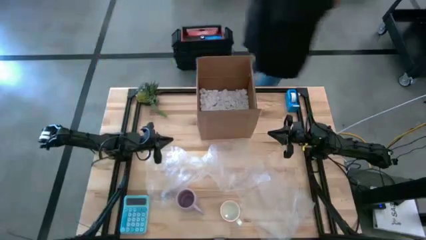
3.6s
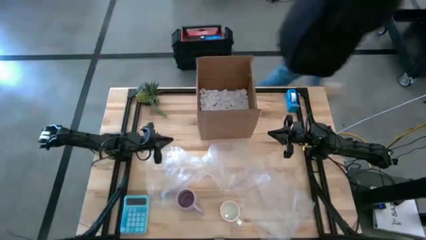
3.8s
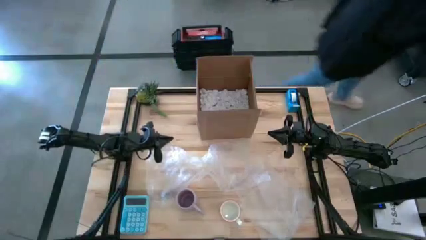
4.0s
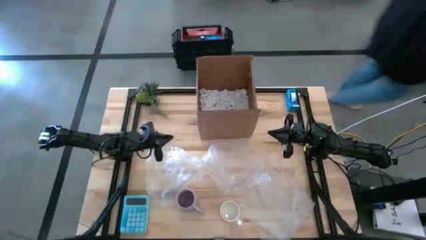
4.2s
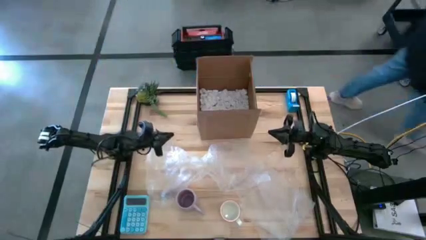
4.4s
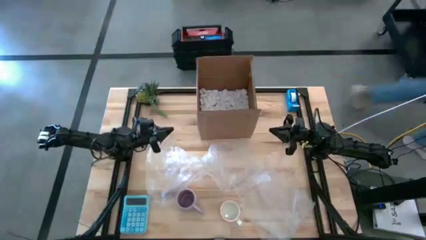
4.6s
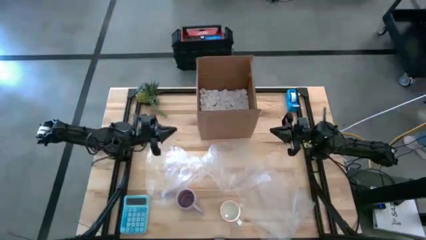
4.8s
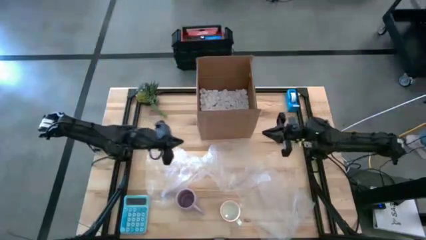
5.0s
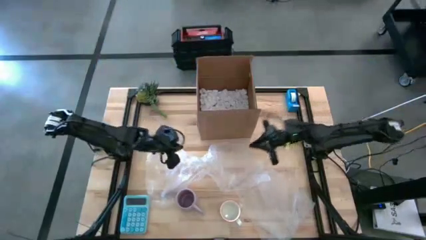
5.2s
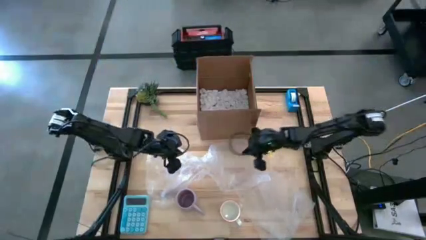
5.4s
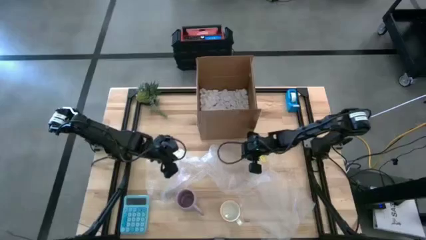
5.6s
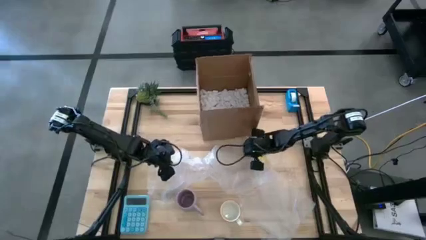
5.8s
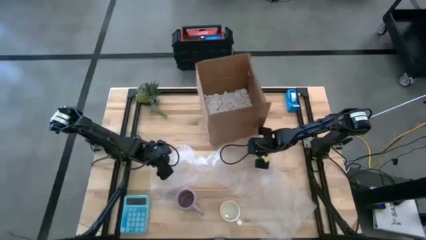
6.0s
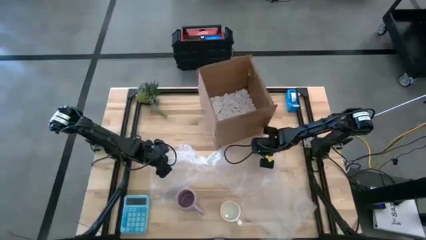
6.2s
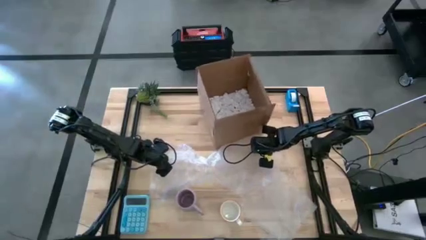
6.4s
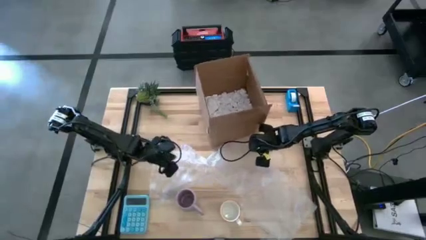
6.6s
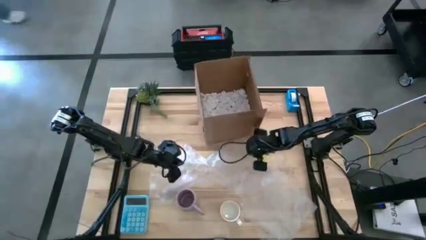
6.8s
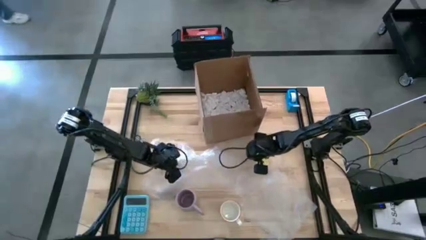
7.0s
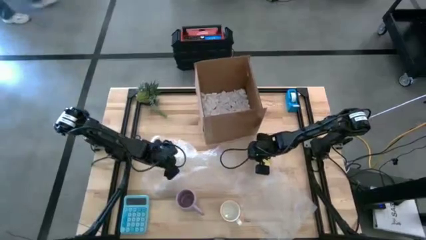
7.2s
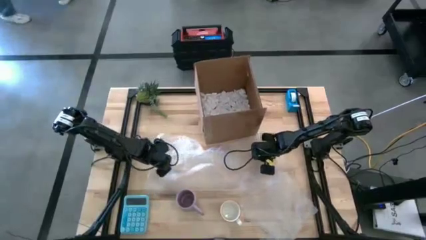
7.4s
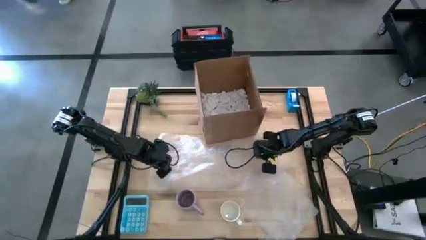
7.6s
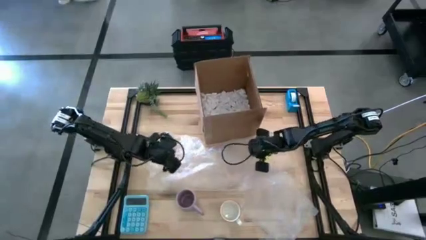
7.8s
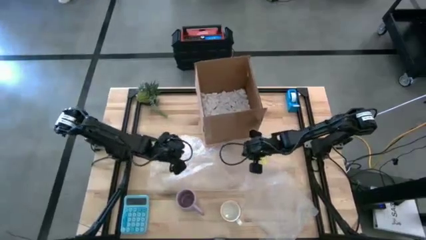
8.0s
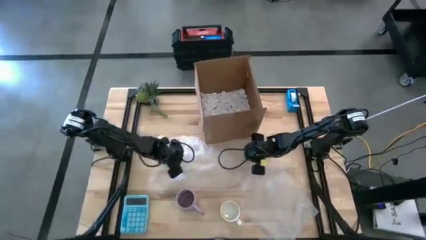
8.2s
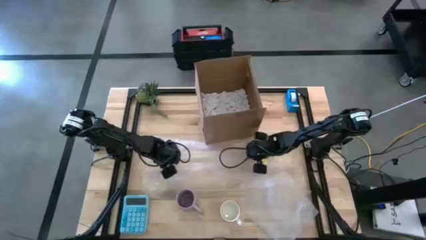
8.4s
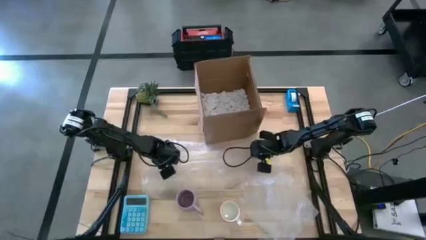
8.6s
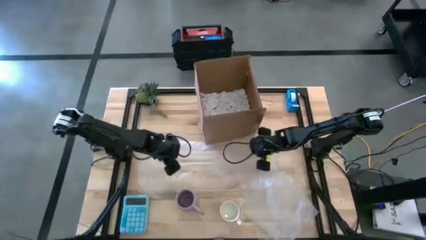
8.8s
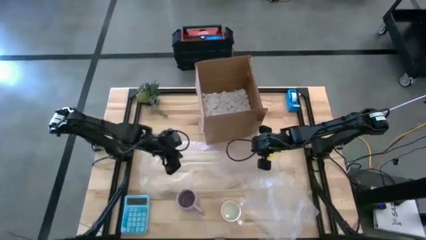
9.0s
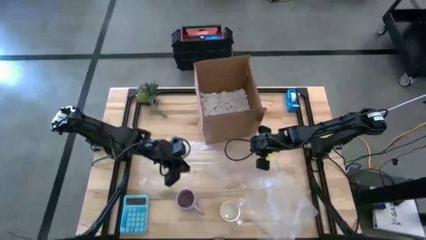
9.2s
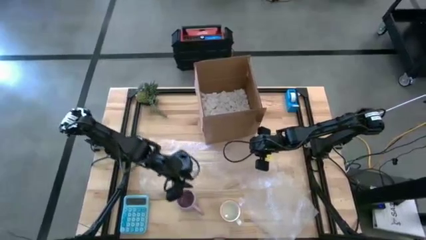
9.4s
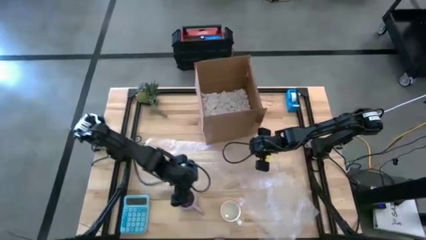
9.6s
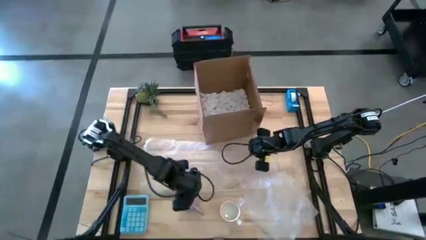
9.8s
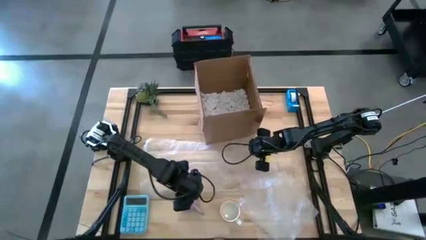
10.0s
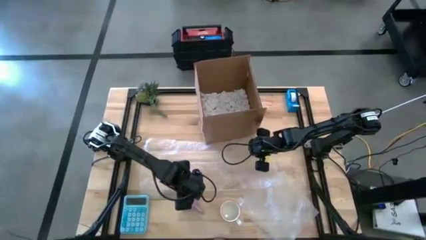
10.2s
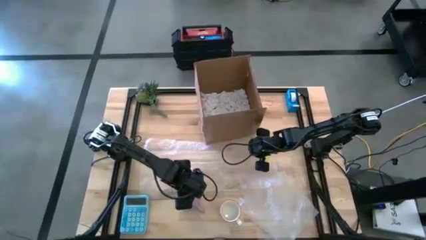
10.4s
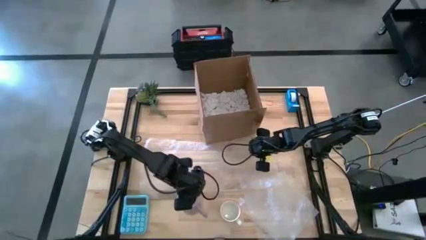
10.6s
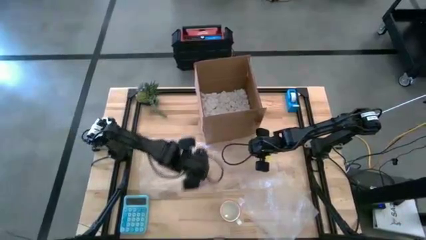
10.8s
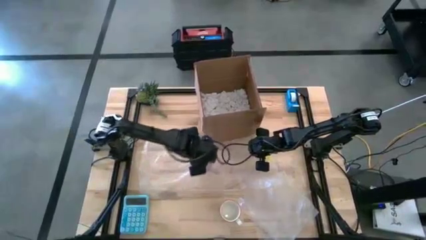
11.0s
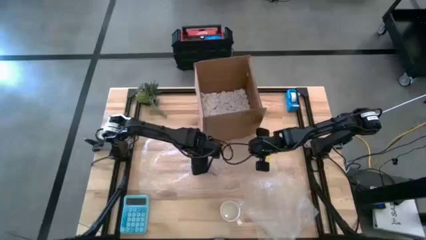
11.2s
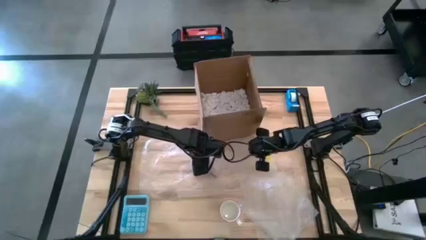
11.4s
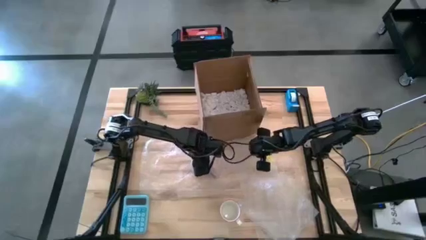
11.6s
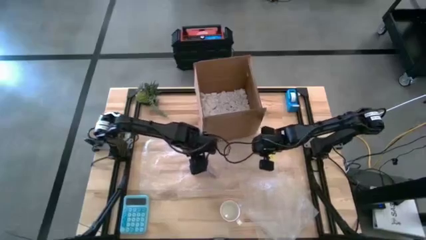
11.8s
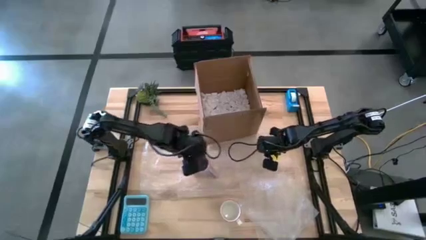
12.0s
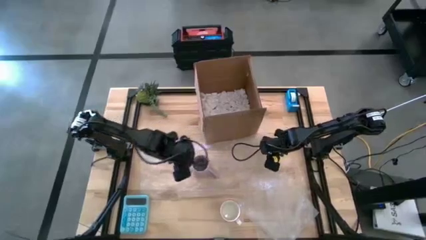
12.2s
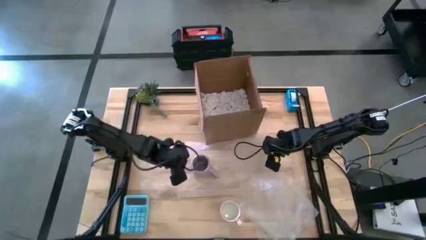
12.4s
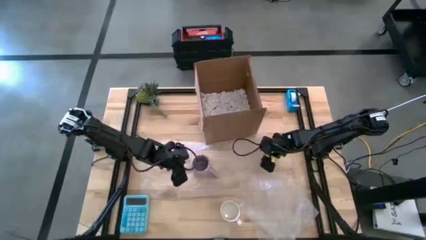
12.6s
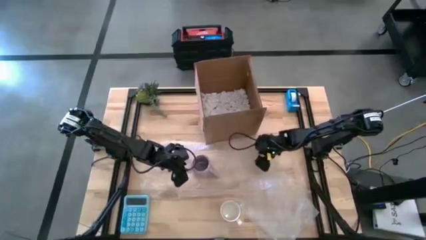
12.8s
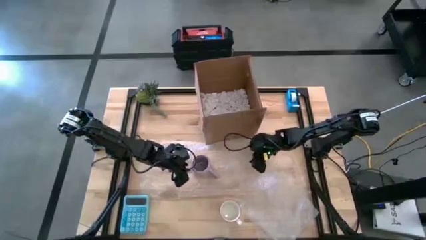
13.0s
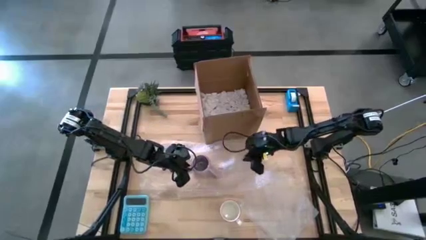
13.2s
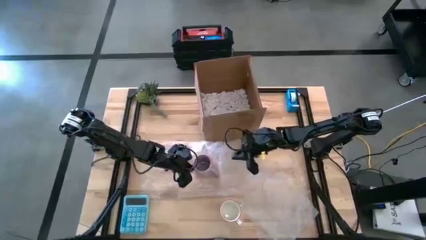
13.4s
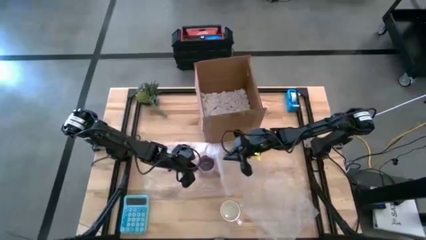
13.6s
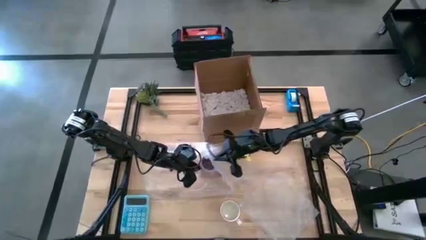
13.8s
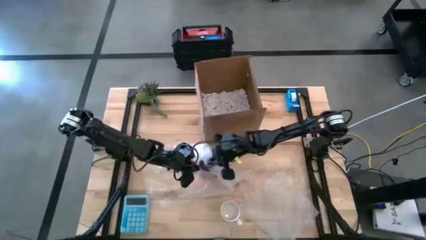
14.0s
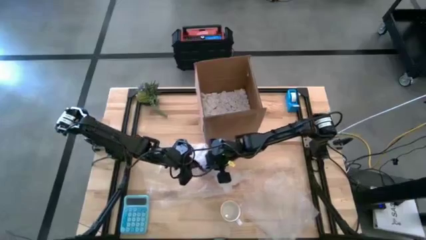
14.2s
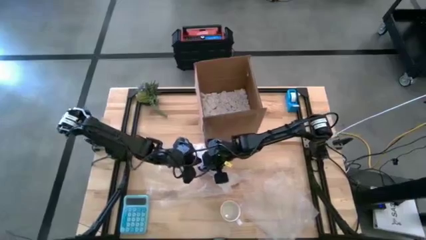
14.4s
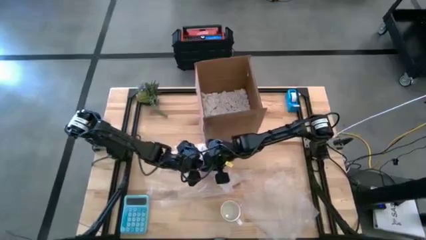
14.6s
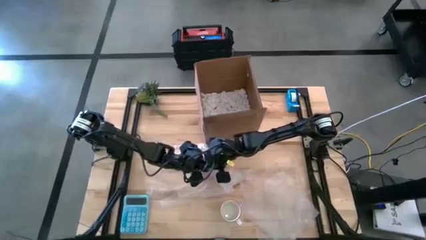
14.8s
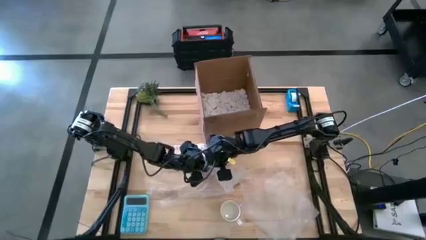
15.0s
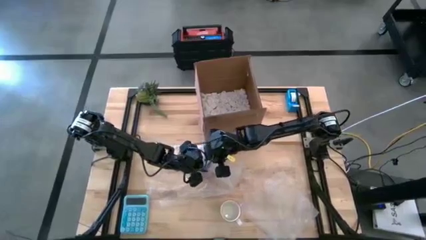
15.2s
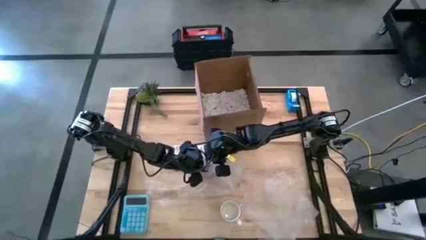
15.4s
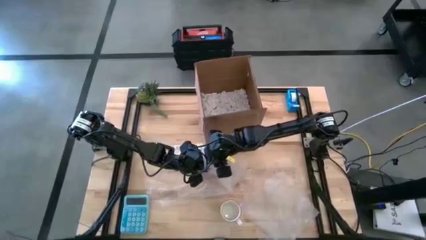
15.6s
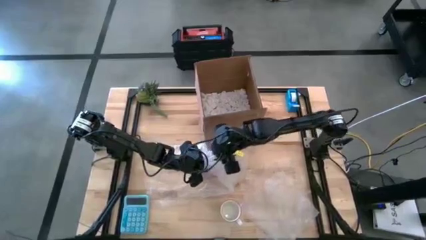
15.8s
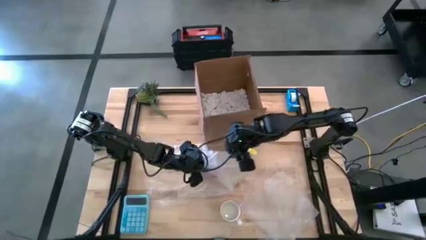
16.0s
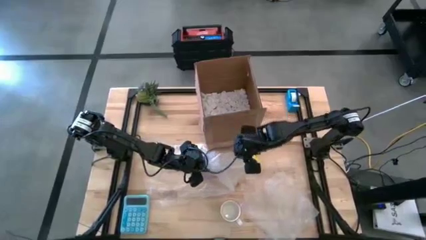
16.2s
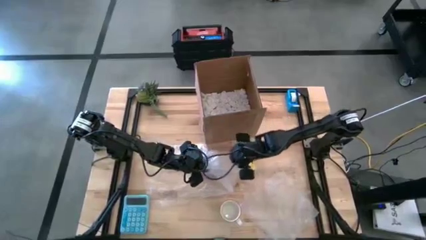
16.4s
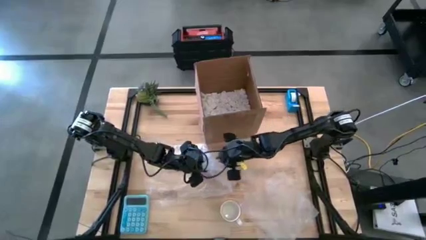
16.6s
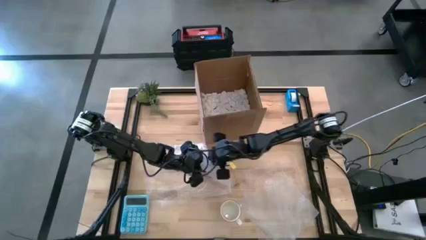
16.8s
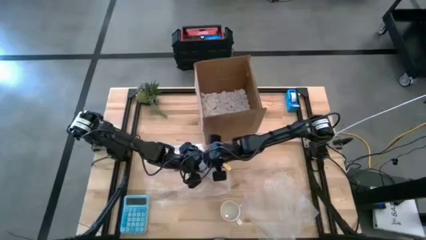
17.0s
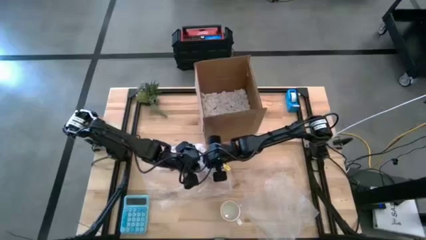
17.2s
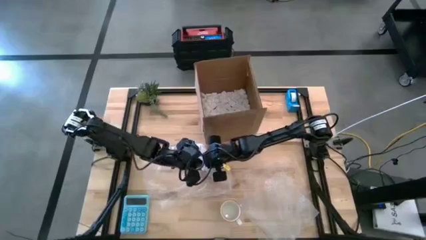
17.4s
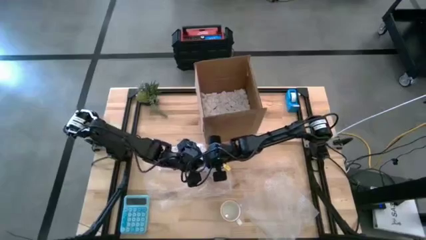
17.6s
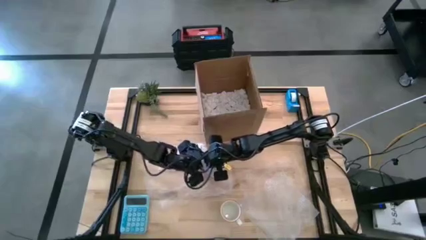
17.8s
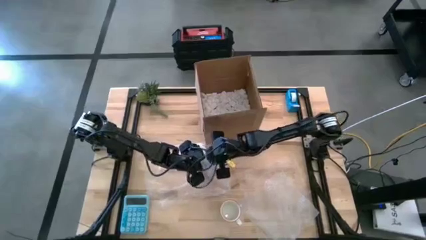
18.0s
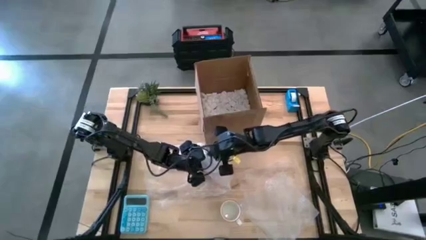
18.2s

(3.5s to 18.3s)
Task: wrap mug
Wrap the purple mug with the left bubble wrap
